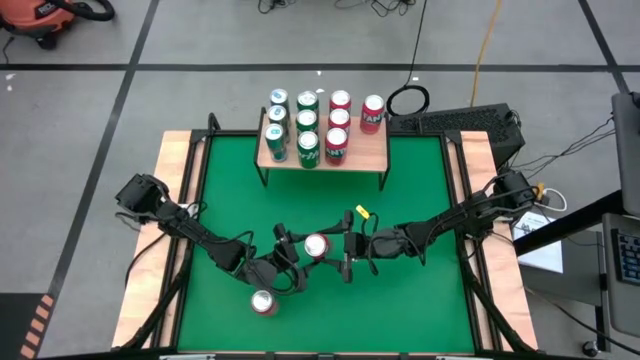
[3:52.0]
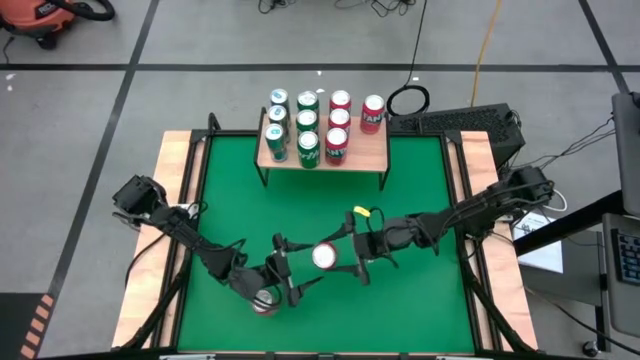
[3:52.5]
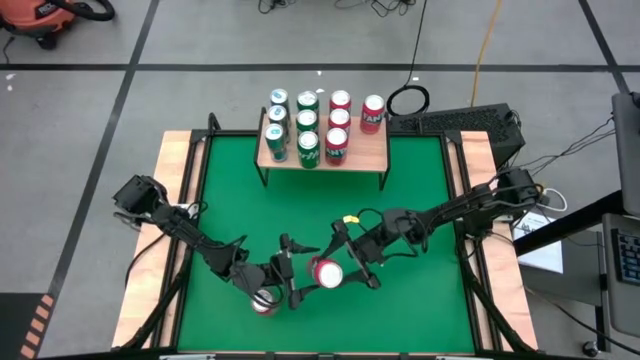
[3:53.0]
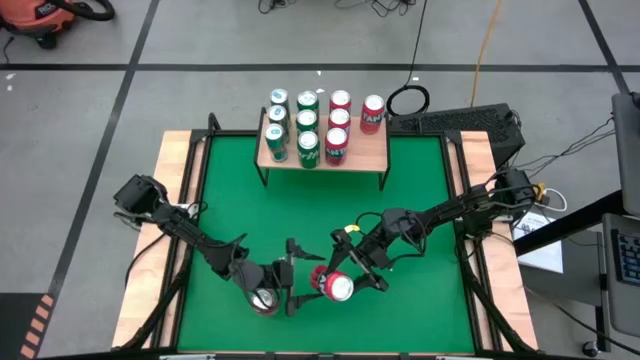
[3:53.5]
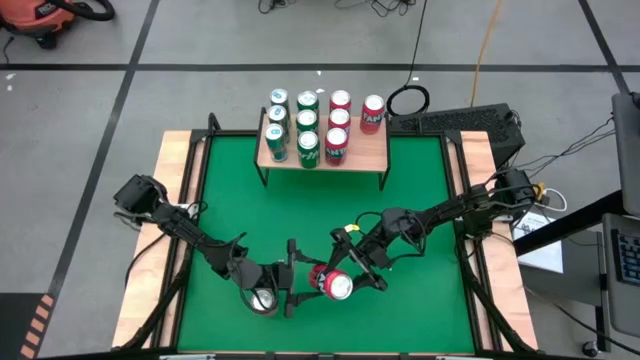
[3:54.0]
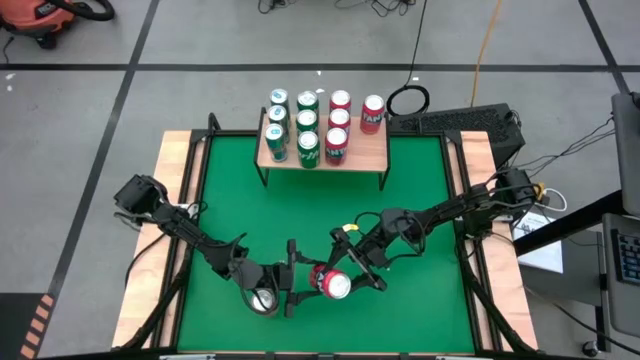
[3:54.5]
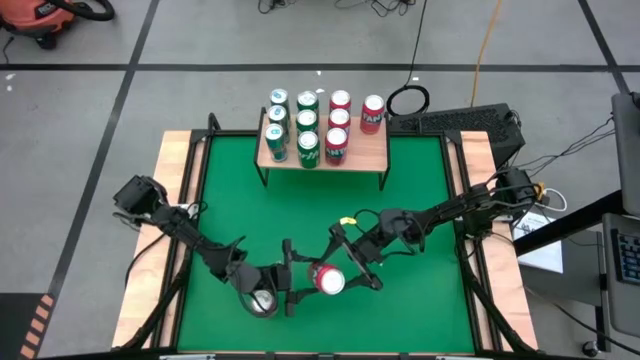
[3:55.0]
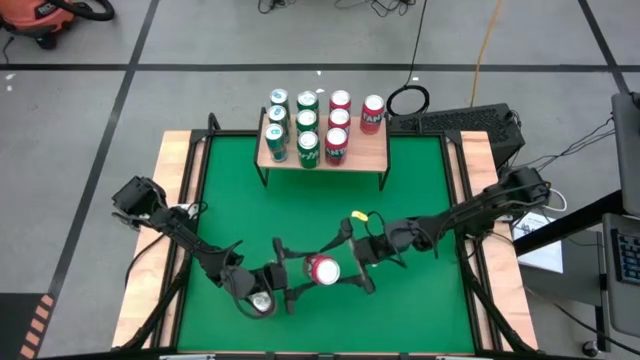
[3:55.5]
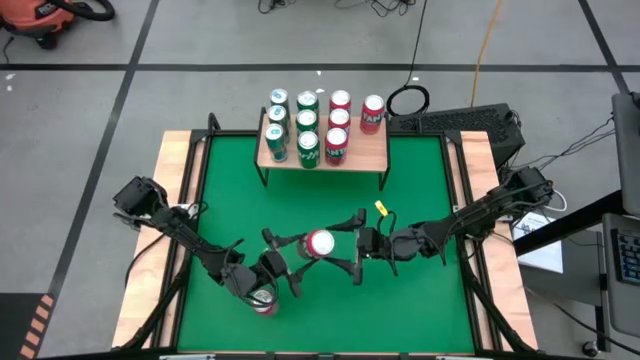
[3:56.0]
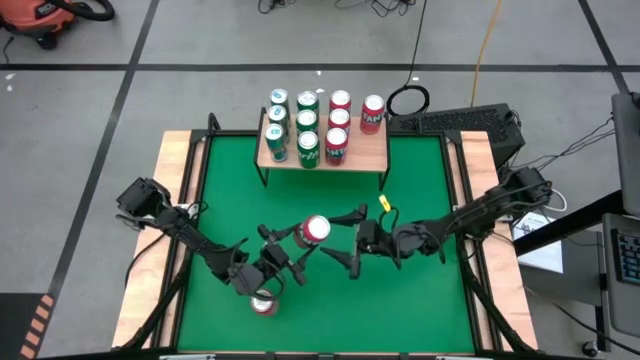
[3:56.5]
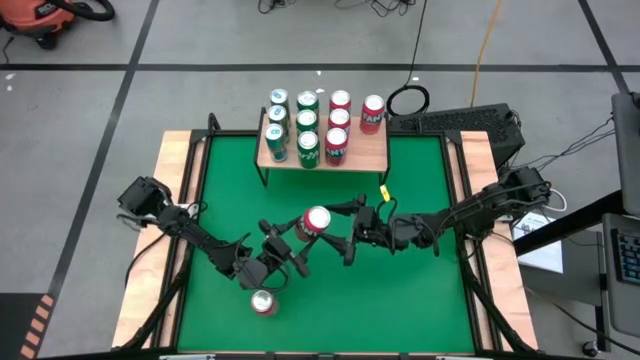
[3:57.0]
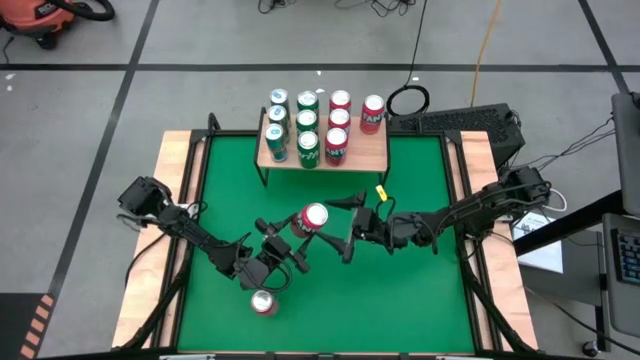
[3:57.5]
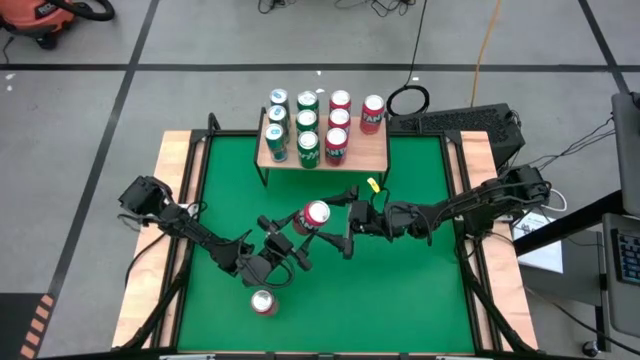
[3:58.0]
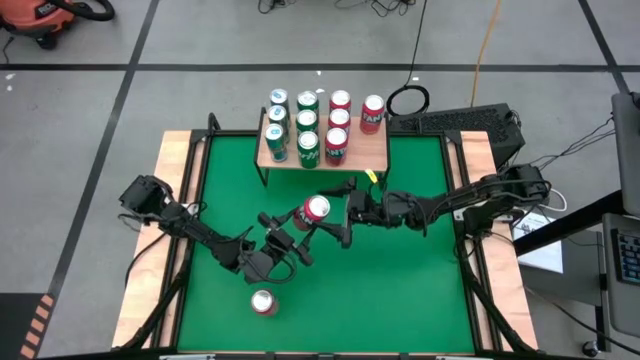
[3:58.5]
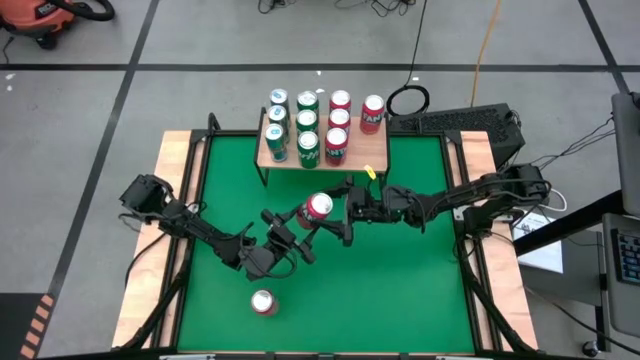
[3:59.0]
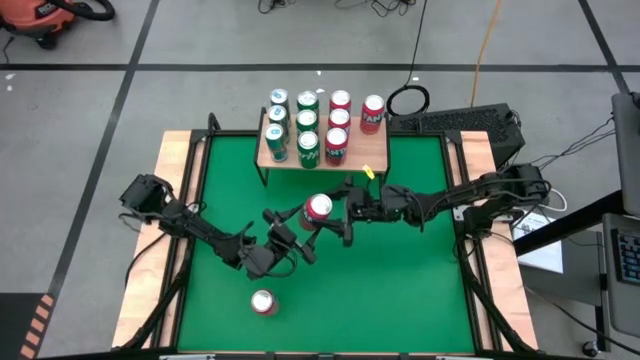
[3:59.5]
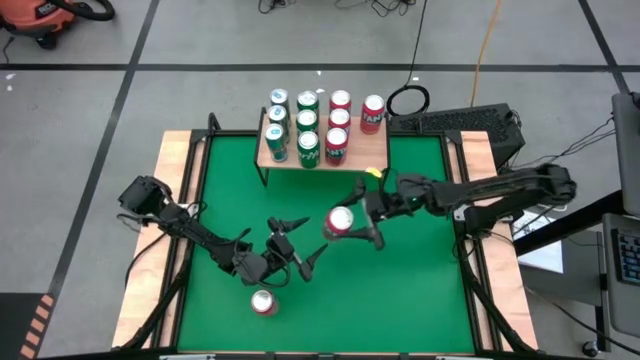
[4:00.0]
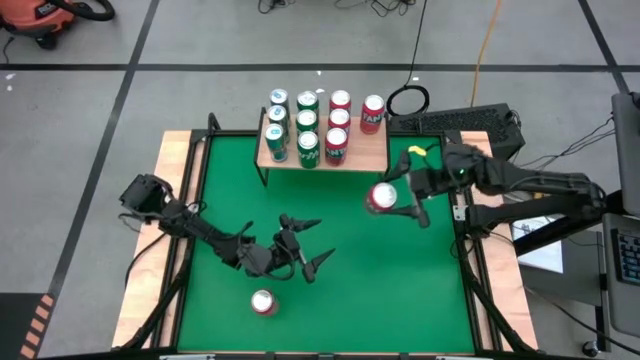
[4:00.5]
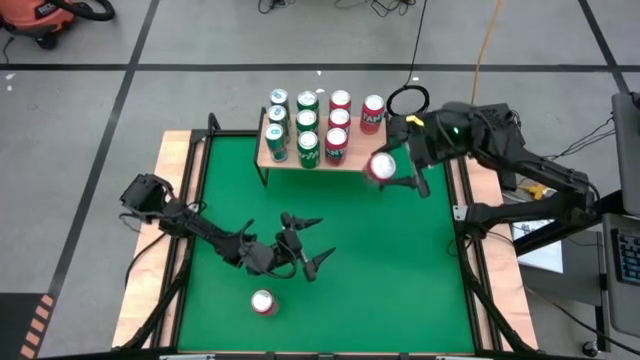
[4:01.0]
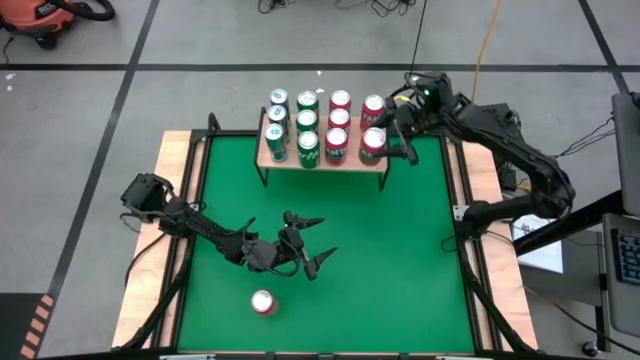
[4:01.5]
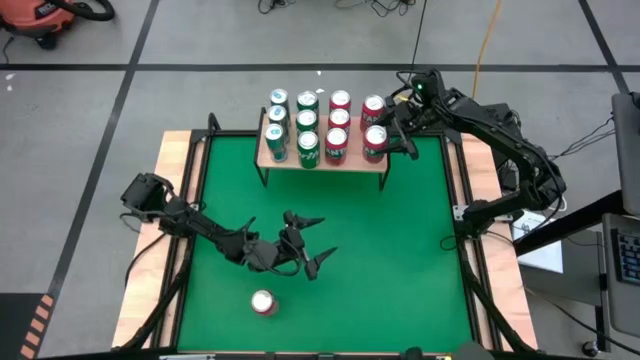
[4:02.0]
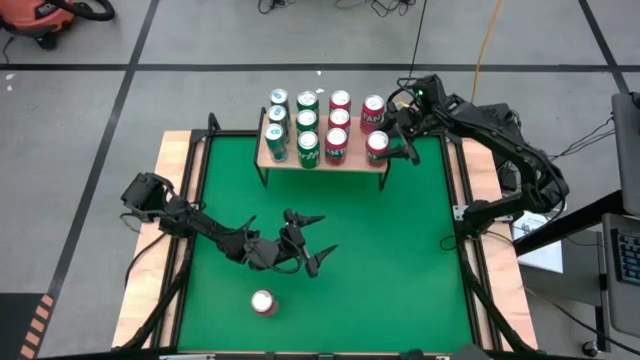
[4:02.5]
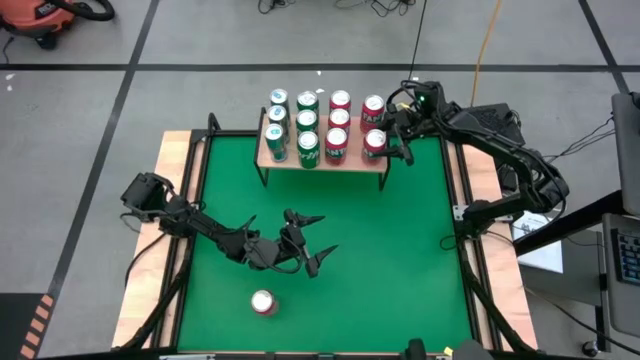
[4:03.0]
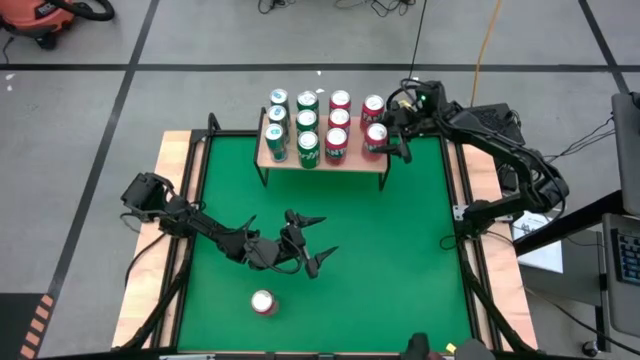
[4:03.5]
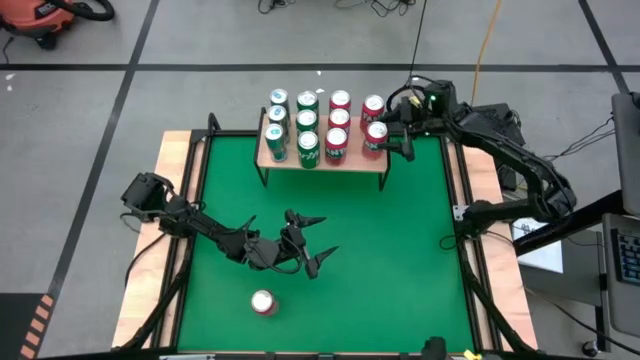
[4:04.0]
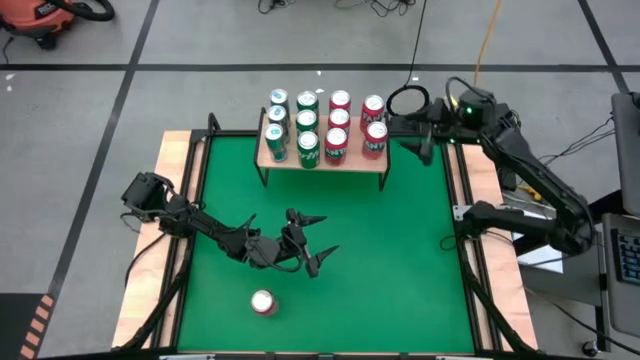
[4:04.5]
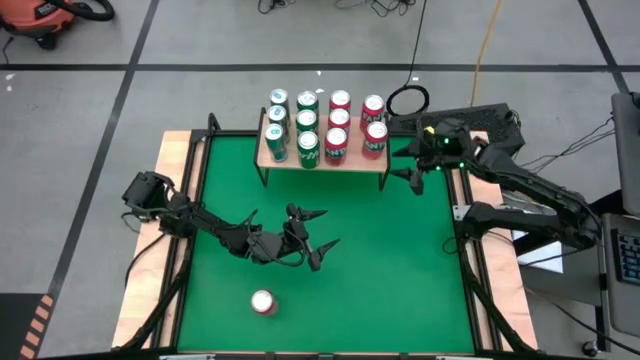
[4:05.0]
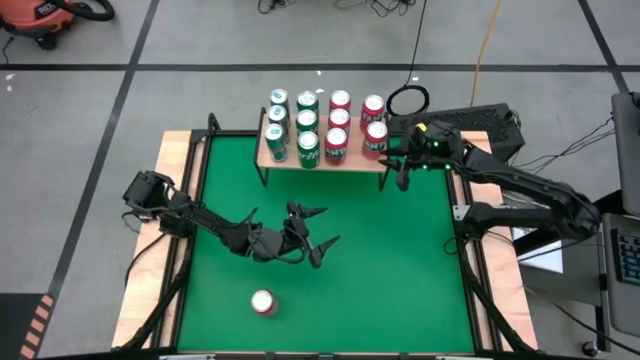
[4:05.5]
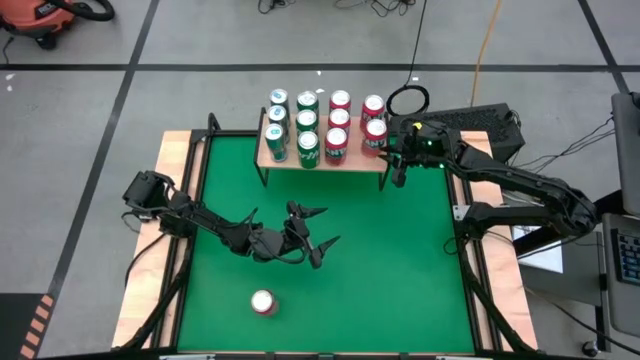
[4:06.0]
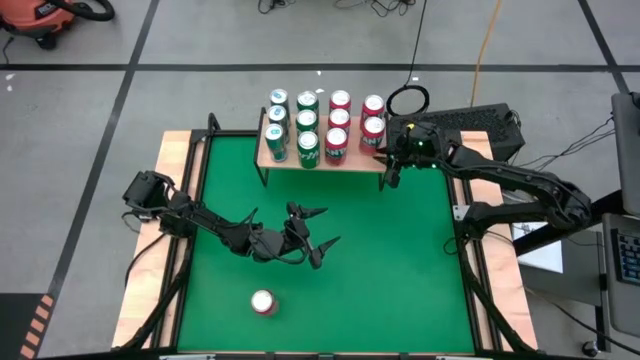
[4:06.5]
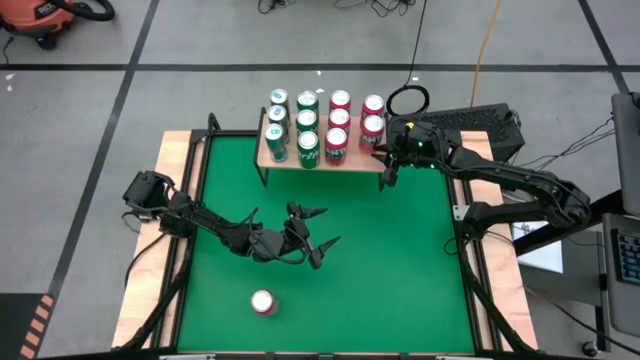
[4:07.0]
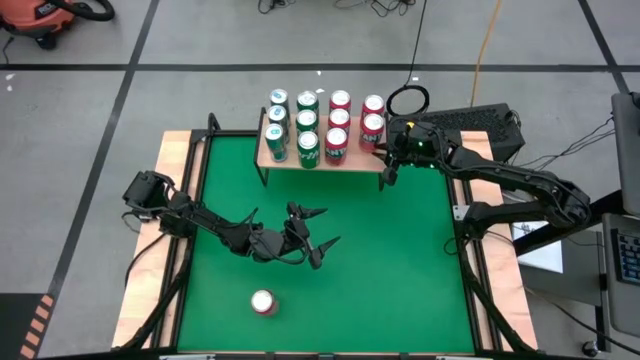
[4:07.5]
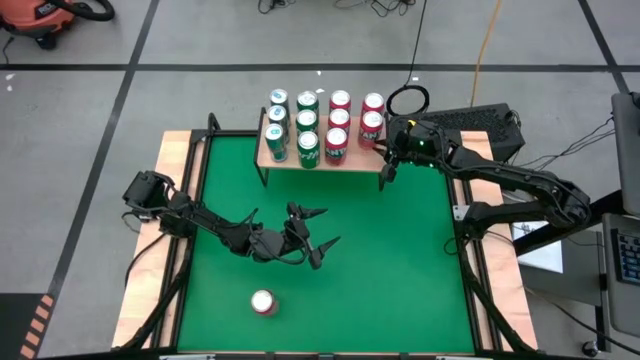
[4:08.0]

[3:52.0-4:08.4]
Task: Place canned beverage on shelf
Put the orange soda can on the shelf aligned with the other orange soda can

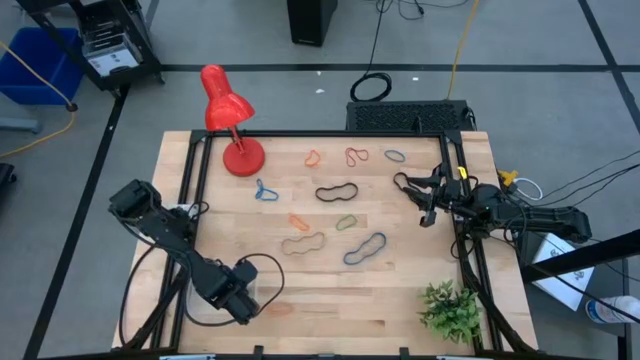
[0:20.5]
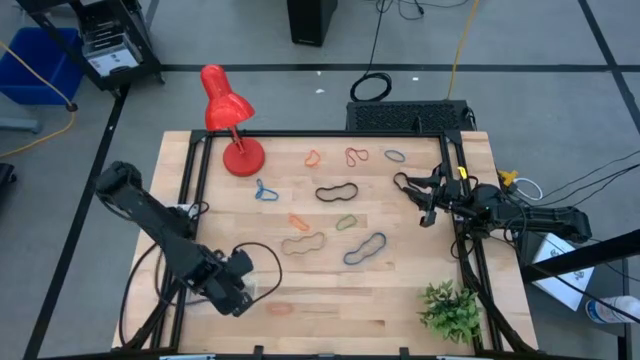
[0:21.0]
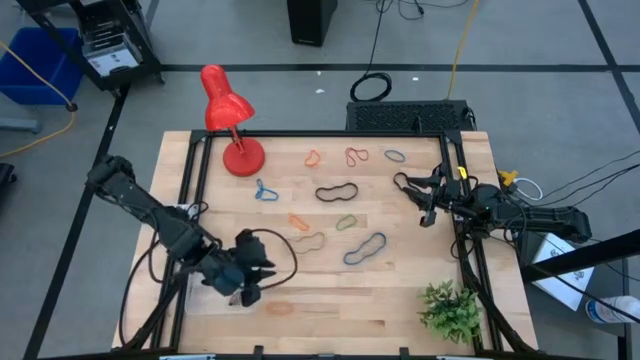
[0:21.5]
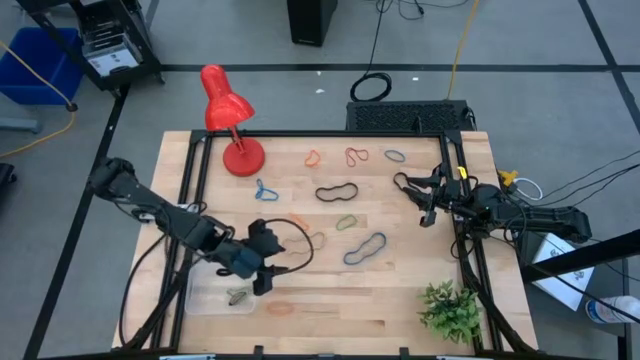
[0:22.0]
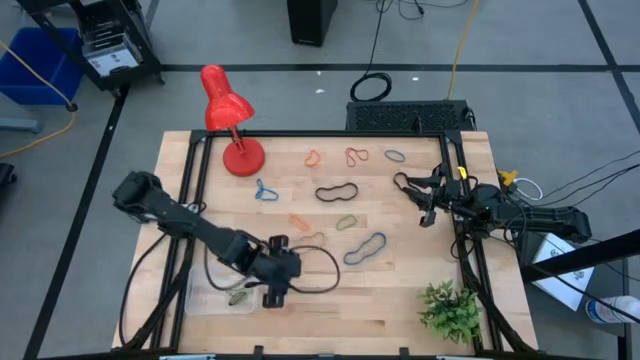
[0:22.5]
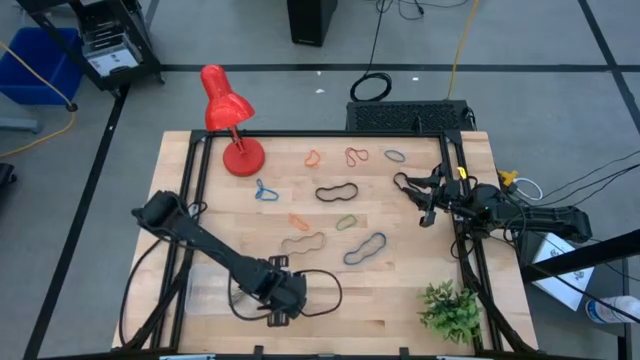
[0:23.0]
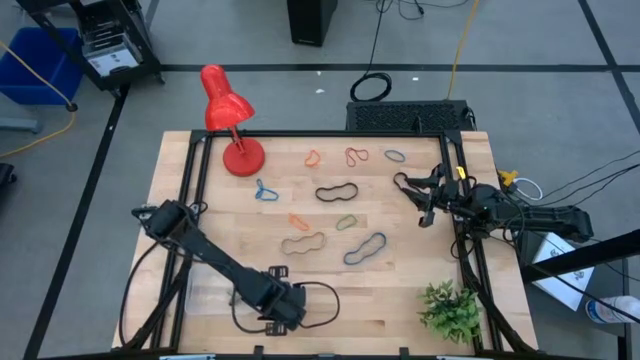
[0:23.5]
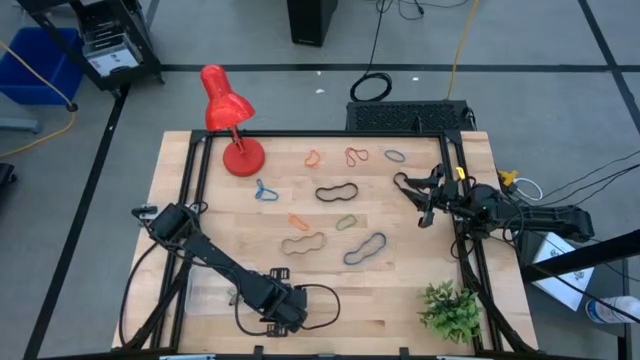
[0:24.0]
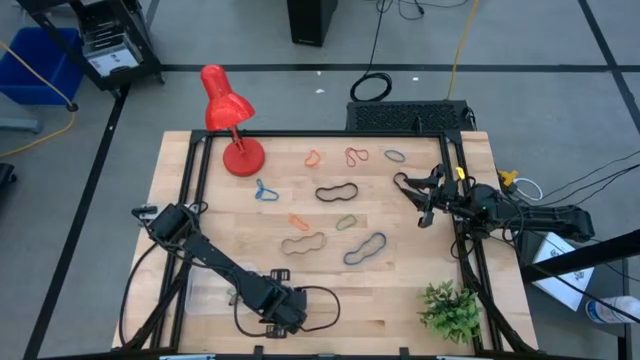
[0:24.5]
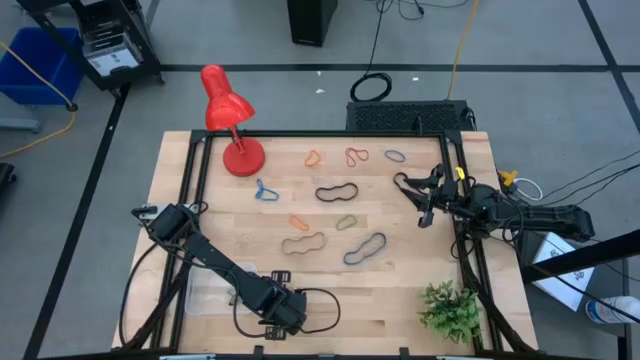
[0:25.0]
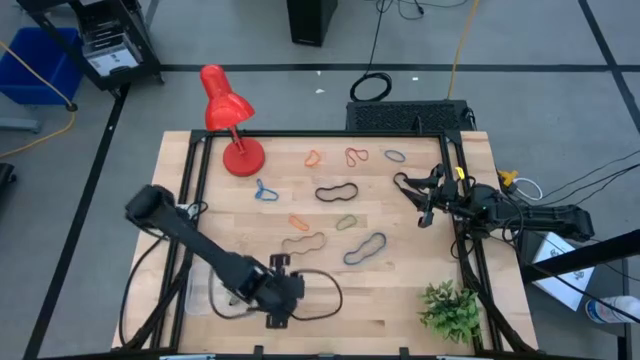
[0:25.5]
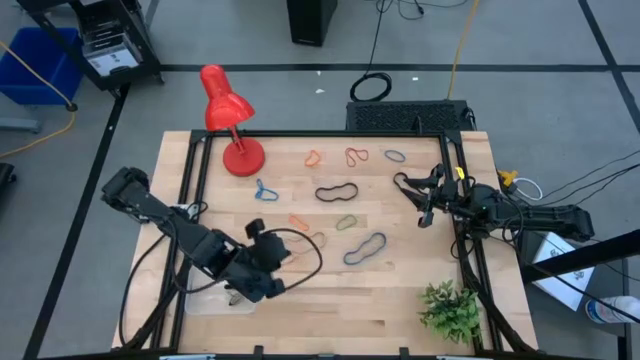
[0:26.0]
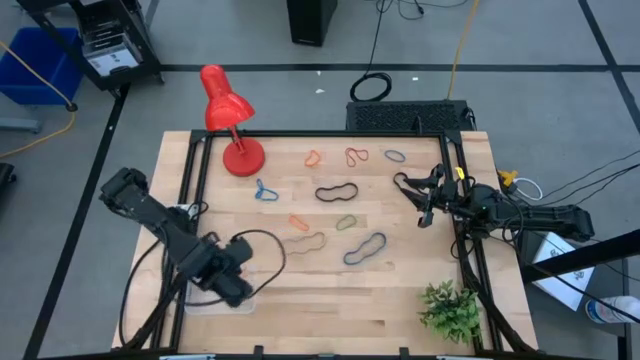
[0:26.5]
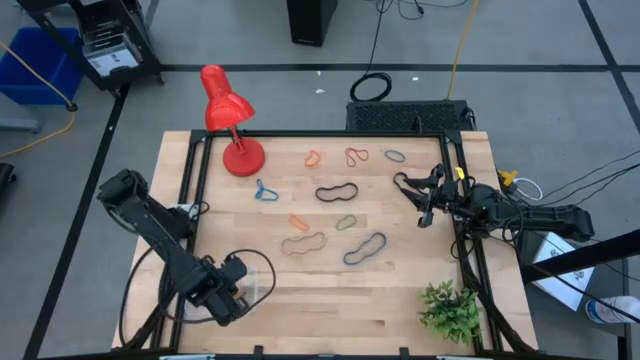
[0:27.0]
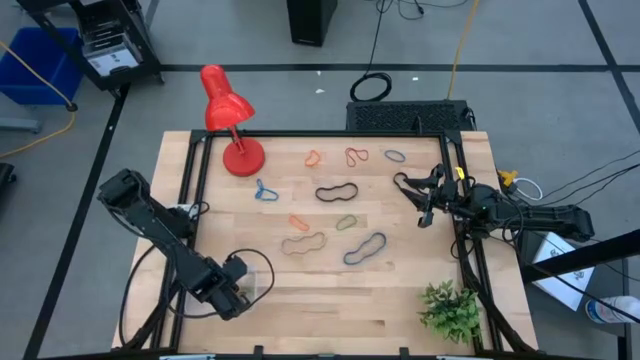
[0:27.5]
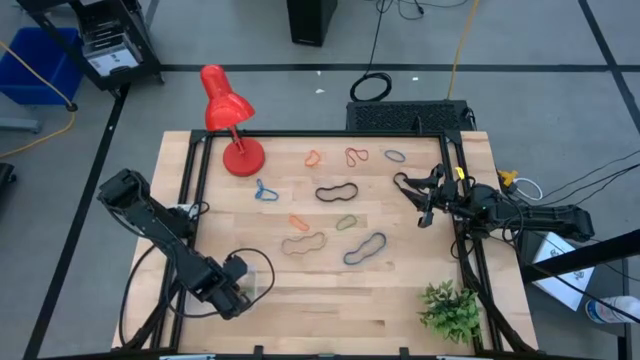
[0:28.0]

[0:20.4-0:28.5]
Task: Pick and place rubber bands into bin
Put the bottom orange rubber band into the transparent bin
